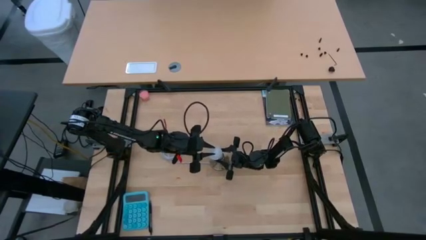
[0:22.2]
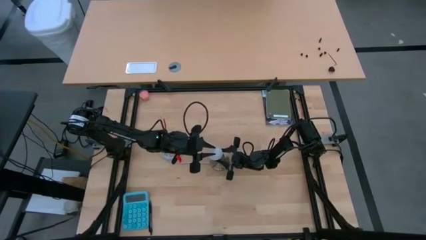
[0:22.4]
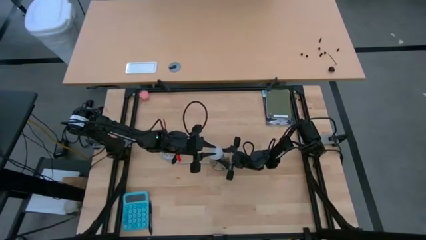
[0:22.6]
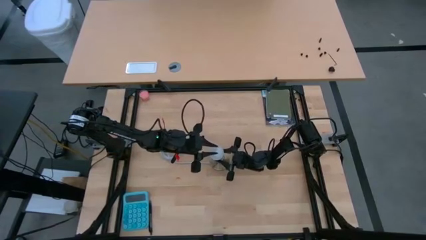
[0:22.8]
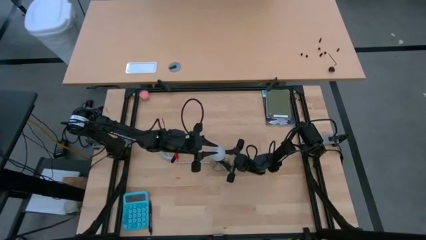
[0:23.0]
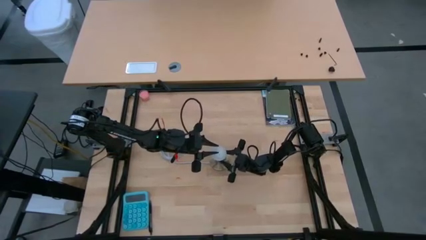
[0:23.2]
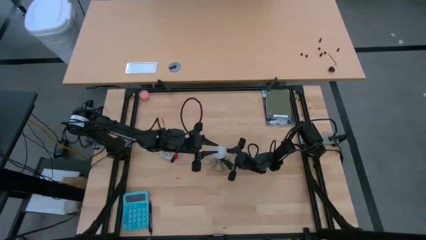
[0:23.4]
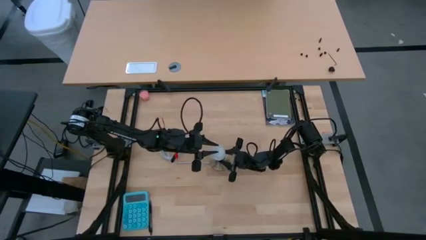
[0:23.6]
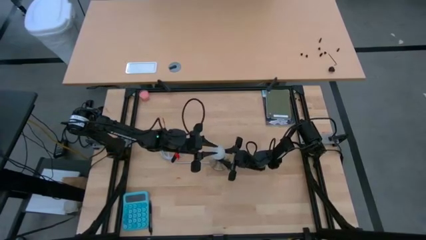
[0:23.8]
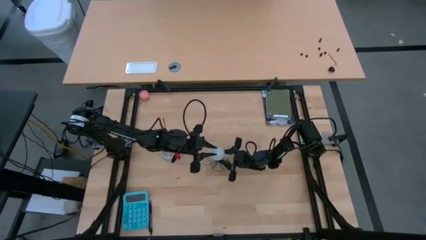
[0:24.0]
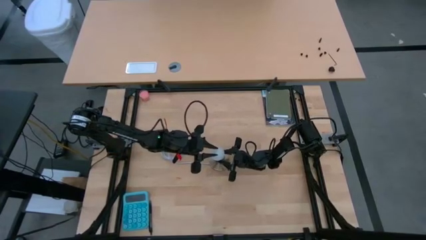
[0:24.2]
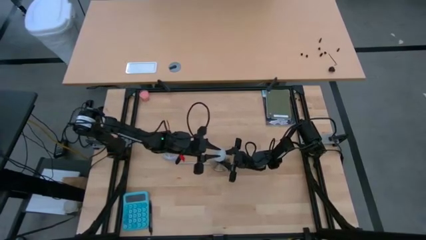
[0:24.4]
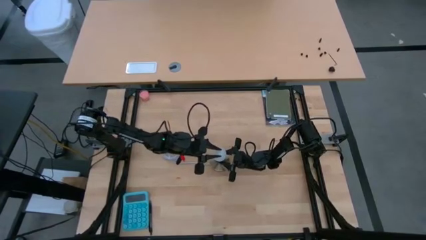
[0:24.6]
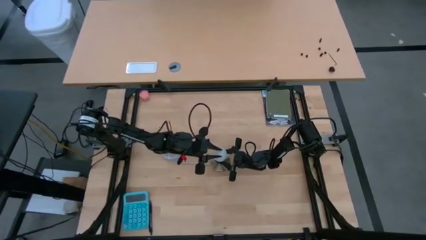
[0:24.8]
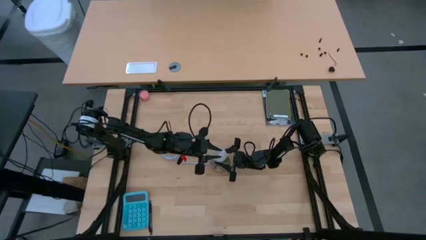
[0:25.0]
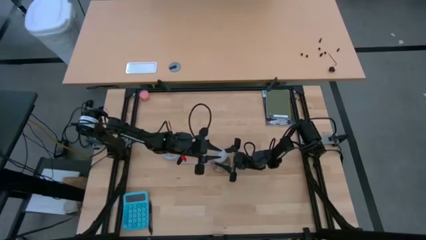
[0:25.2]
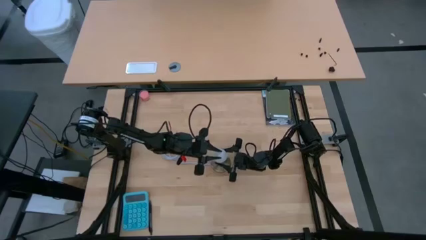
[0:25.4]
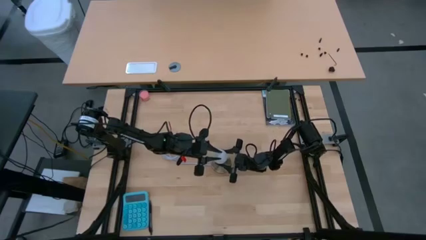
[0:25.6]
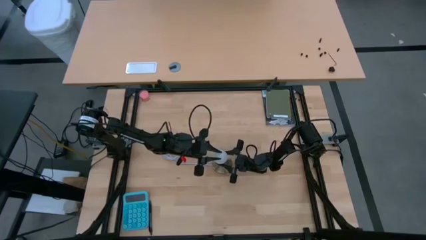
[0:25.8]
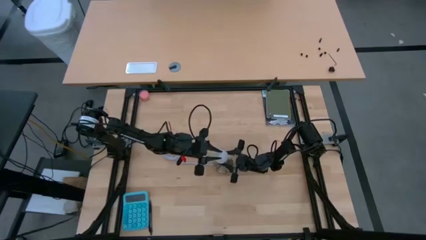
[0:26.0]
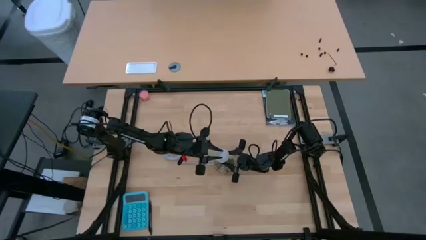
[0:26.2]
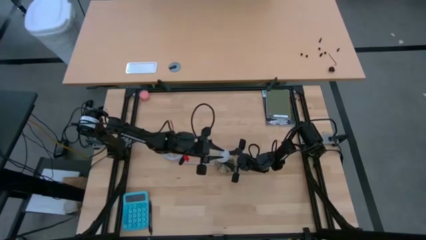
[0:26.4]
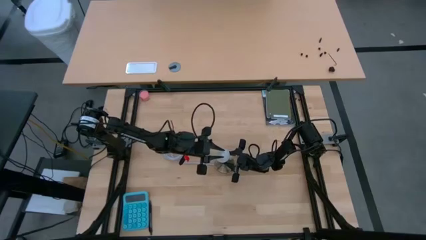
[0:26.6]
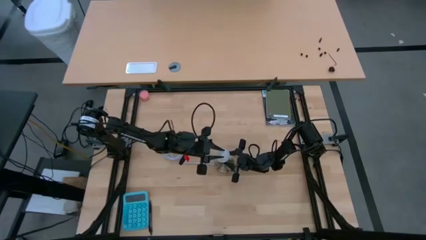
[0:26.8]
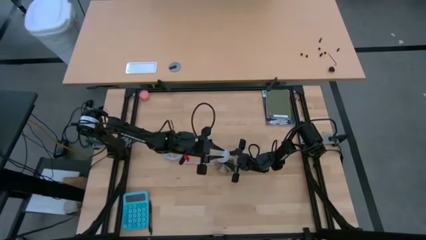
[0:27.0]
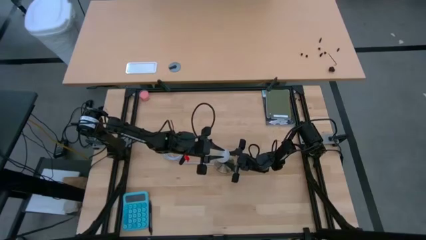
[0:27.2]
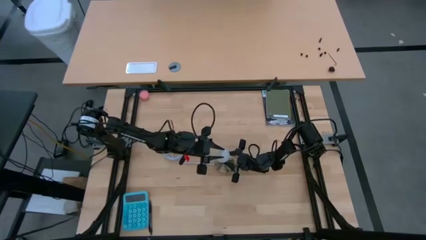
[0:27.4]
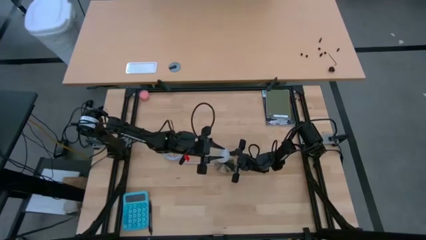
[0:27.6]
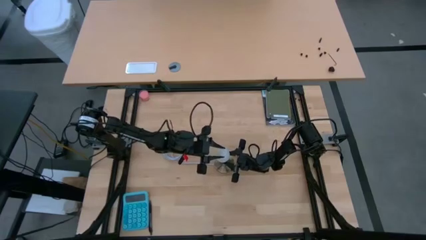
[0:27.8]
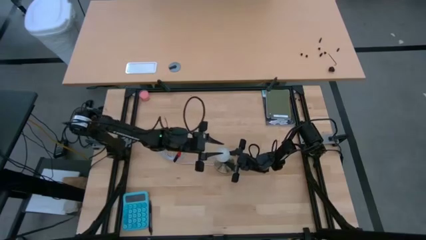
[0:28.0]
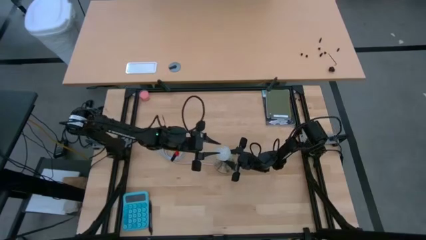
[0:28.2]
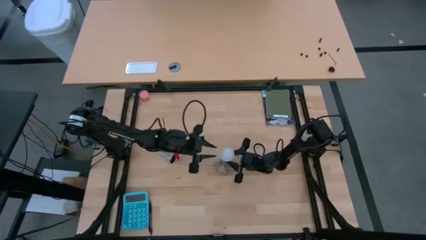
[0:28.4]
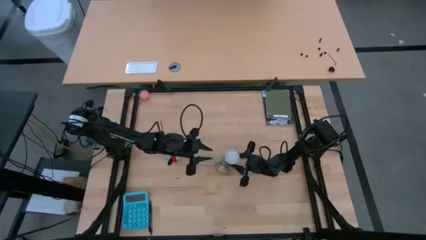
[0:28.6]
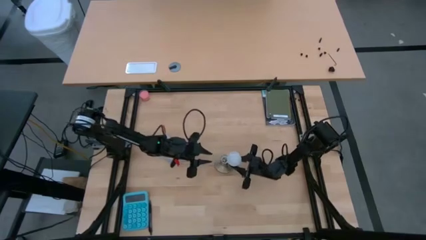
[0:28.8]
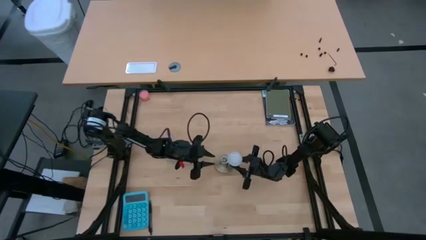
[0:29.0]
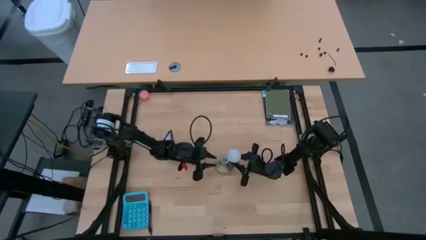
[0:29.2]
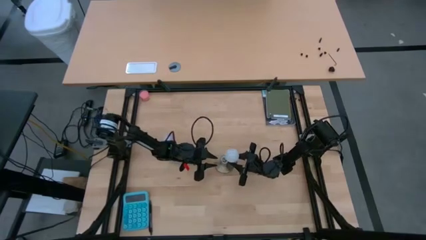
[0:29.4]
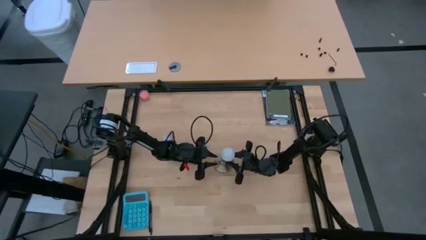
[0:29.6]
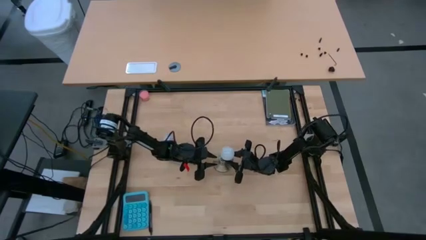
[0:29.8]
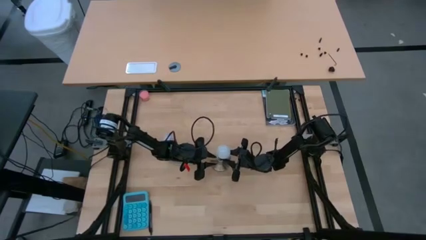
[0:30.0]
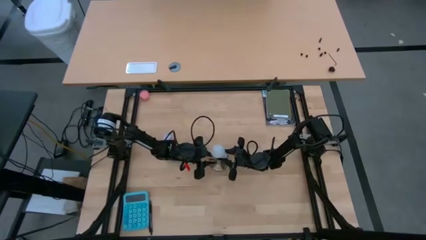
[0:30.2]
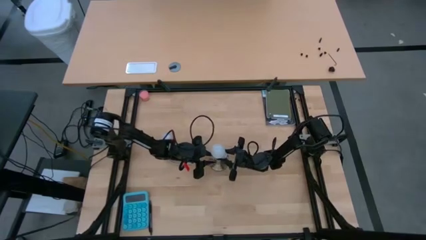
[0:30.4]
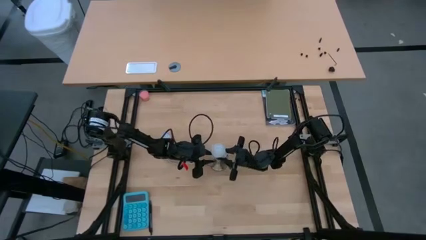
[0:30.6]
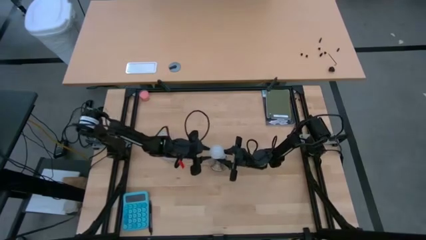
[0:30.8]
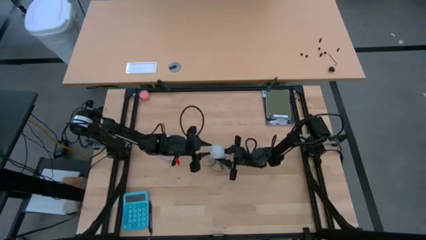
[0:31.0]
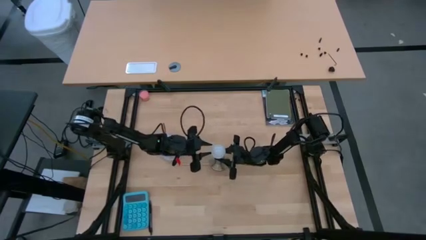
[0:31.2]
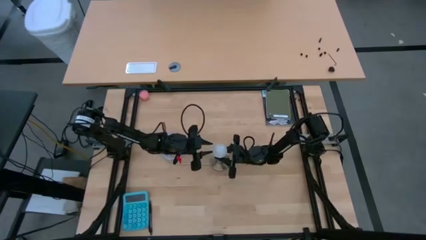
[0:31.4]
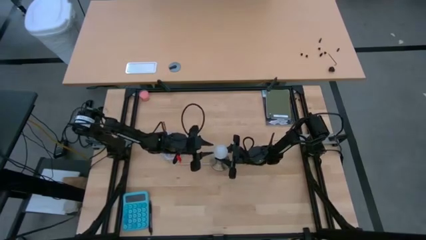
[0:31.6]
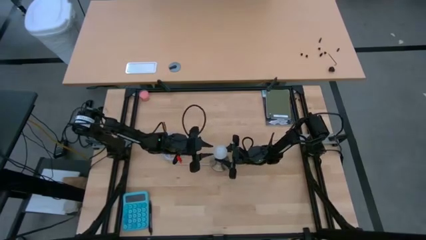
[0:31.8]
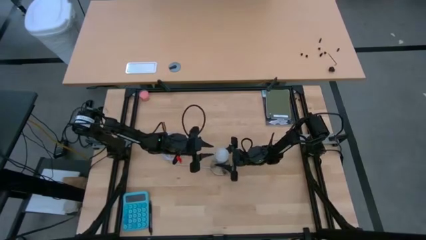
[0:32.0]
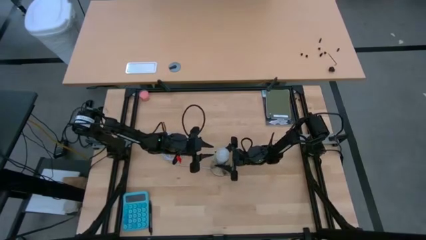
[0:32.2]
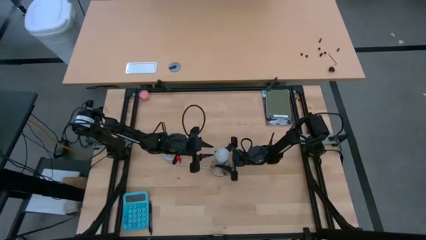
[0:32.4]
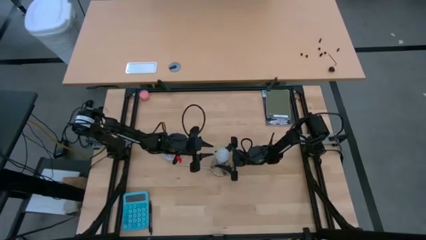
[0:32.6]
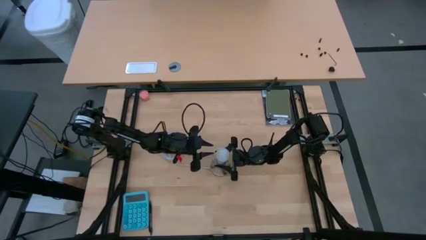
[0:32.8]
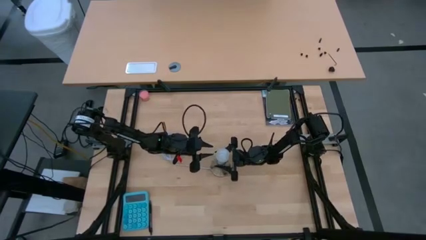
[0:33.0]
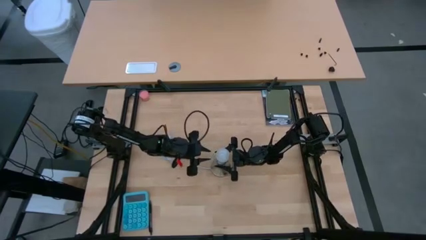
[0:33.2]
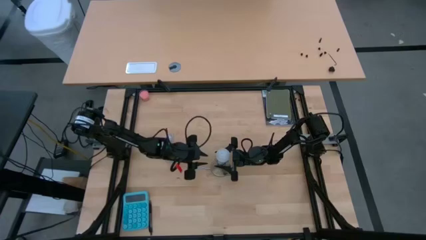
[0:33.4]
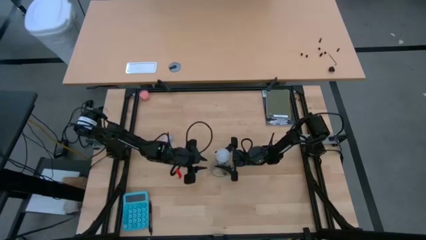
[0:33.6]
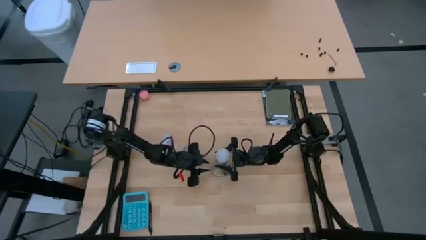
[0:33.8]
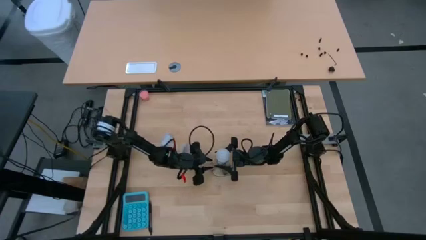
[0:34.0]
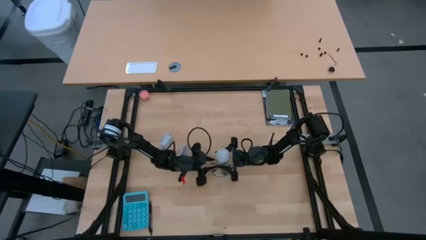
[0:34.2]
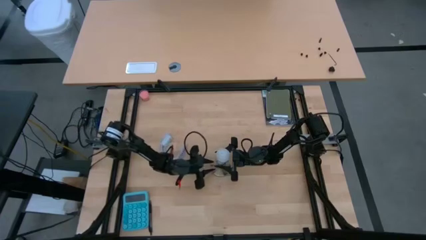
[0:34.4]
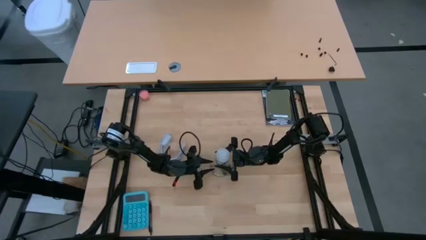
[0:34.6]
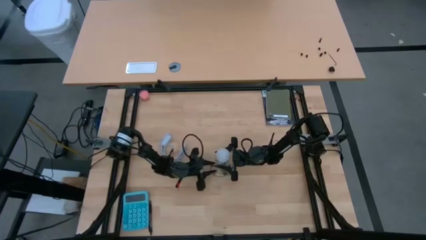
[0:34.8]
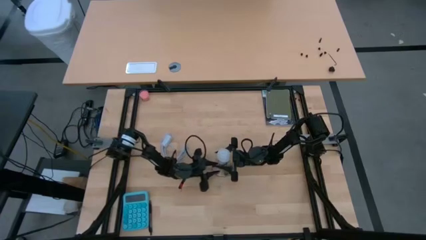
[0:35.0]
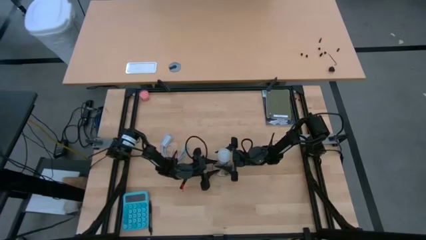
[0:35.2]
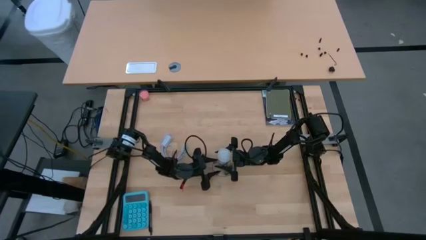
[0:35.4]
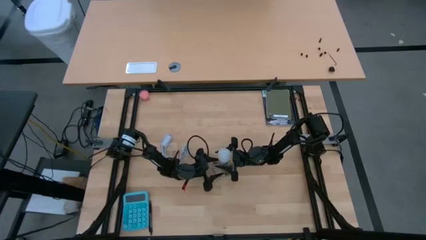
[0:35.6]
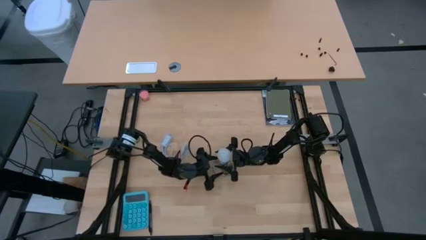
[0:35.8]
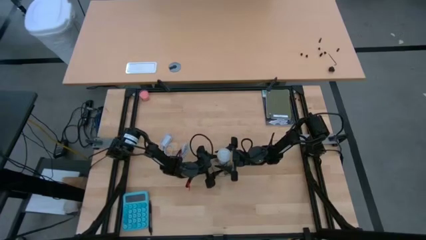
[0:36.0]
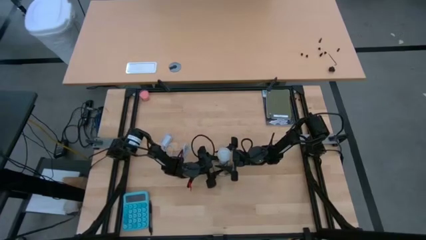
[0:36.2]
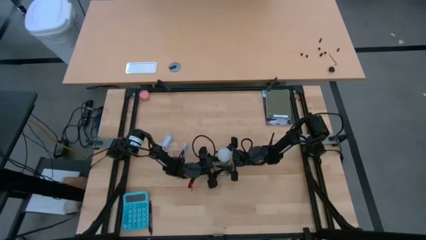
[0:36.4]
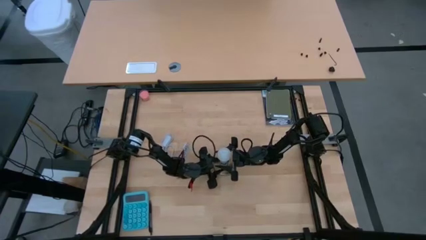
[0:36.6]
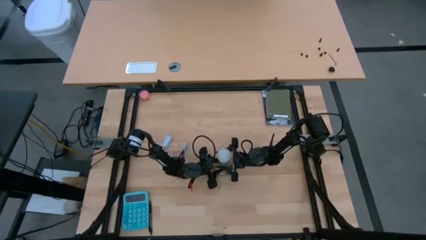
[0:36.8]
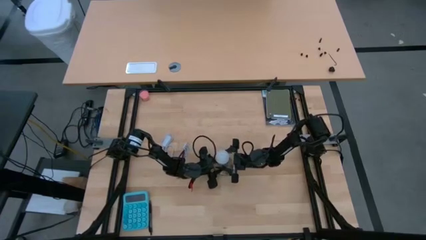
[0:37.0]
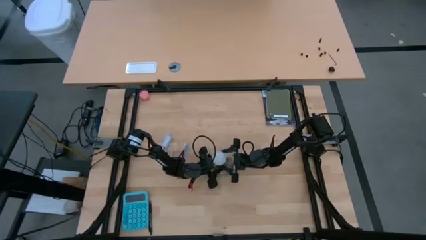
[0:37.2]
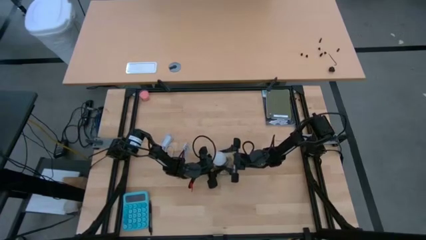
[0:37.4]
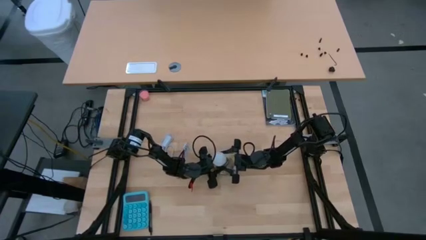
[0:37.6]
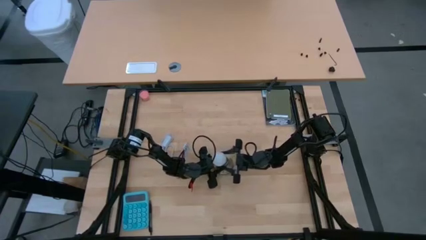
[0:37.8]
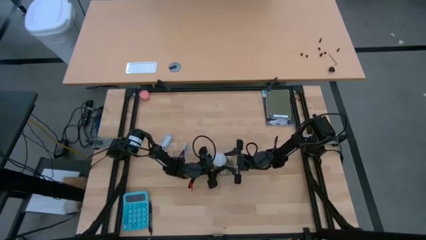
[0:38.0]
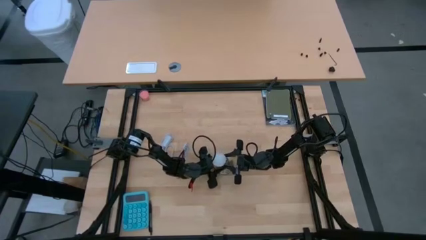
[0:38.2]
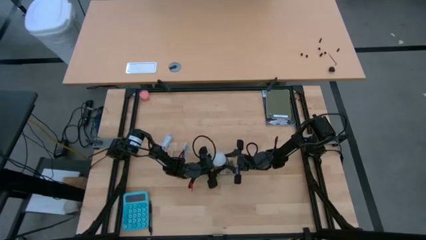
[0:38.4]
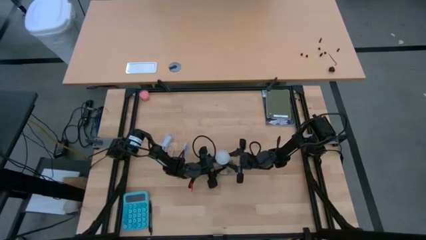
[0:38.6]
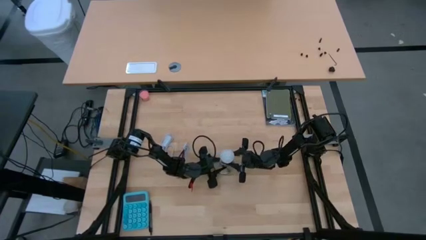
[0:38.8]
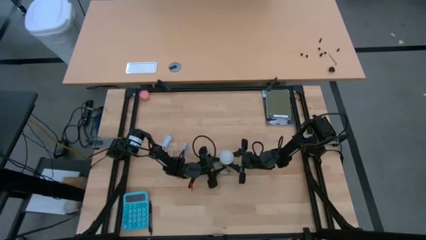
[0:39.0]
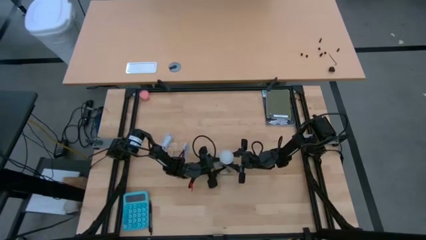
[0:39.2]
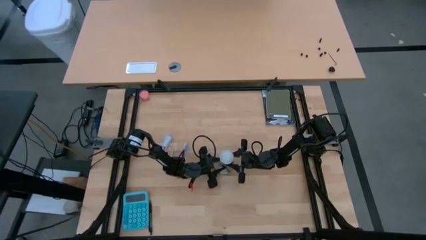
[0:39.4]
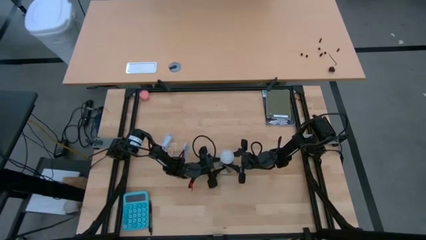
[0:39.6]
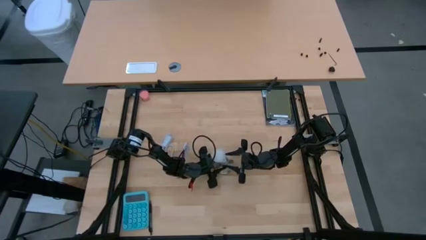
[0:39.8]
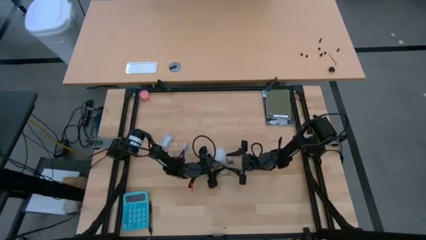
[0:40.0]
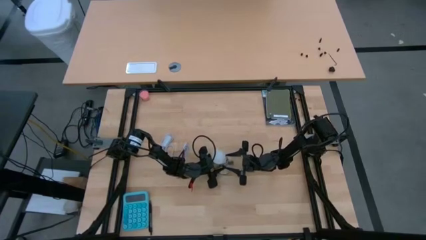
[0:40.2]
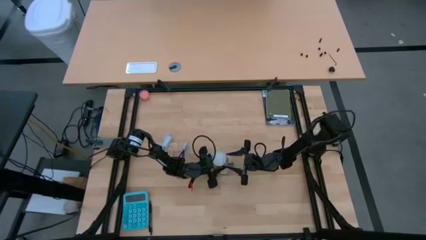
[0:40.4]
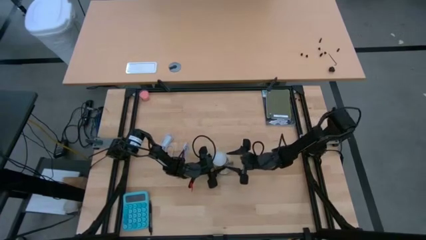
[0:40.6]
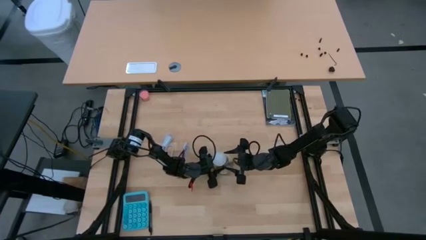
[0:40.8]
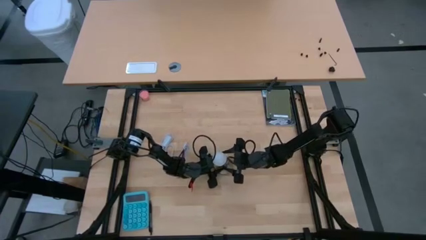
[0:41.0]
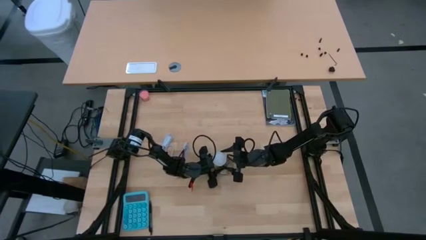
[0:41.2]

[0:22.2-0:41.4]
Task: Screw lightbulb
Insert the lightbulb into the lamp holder
